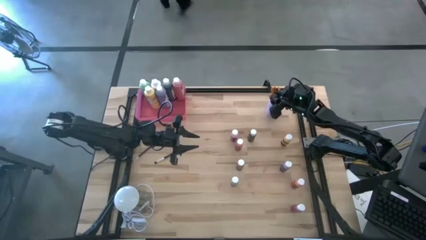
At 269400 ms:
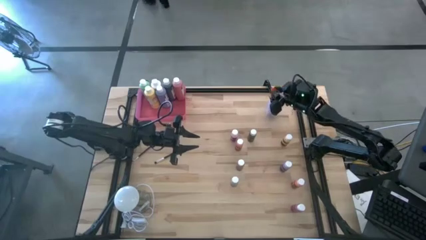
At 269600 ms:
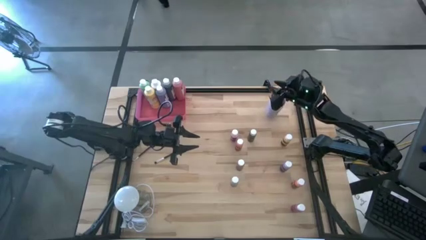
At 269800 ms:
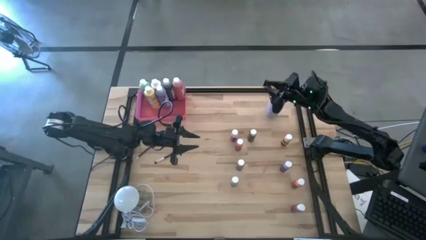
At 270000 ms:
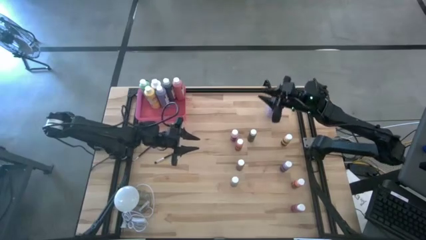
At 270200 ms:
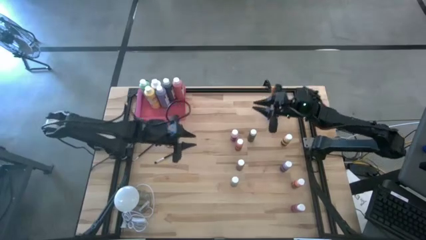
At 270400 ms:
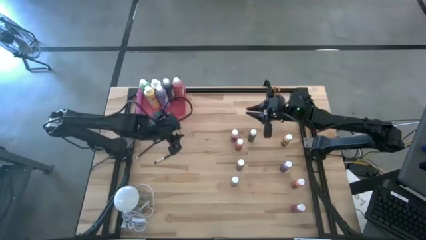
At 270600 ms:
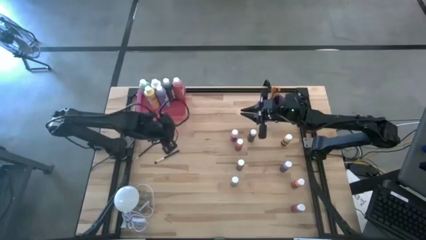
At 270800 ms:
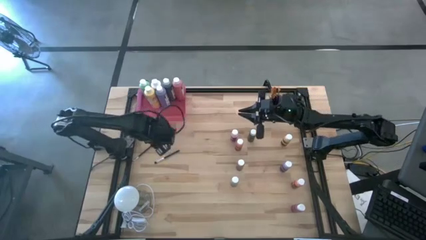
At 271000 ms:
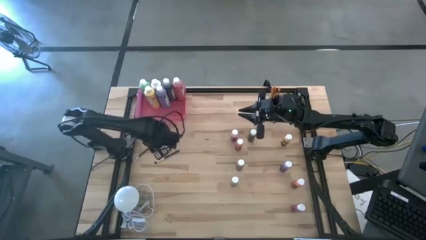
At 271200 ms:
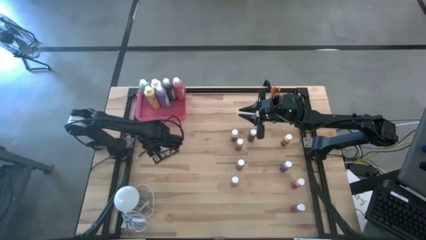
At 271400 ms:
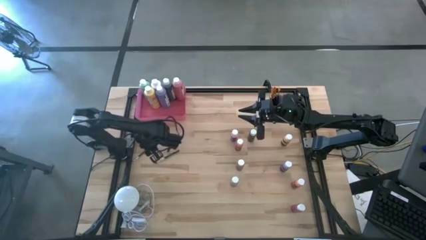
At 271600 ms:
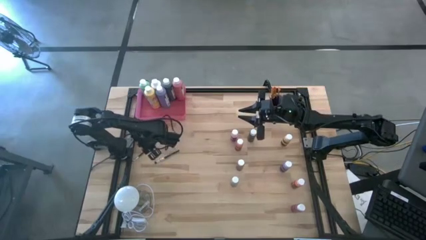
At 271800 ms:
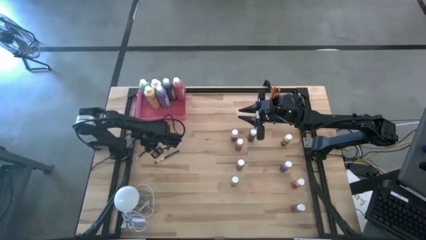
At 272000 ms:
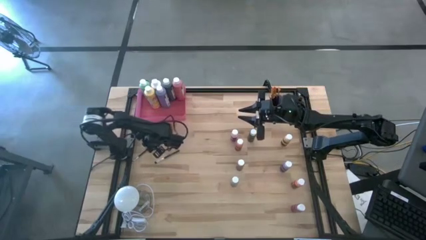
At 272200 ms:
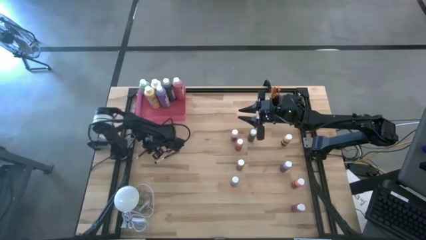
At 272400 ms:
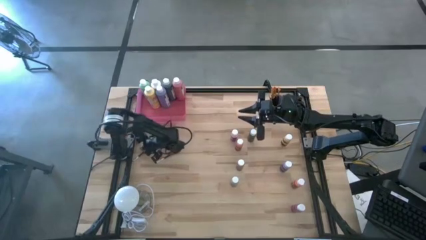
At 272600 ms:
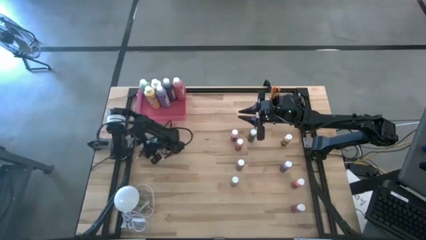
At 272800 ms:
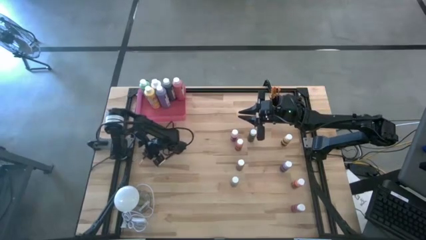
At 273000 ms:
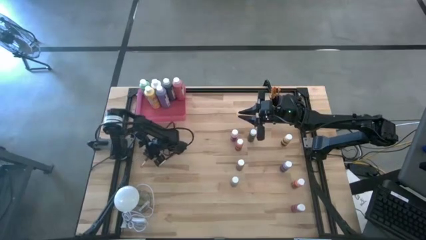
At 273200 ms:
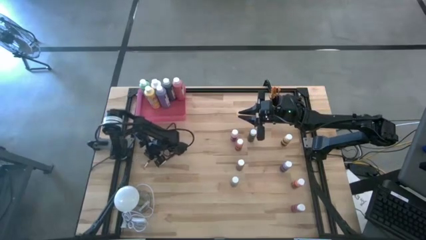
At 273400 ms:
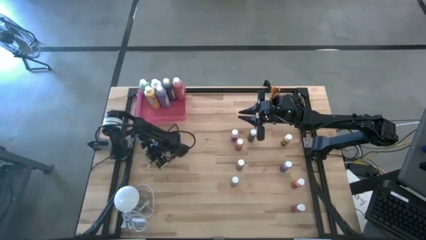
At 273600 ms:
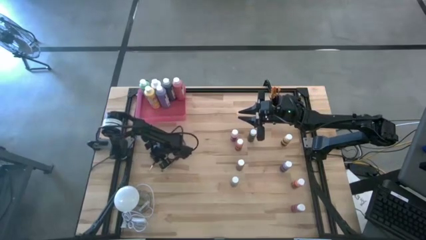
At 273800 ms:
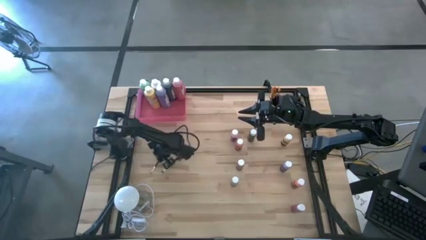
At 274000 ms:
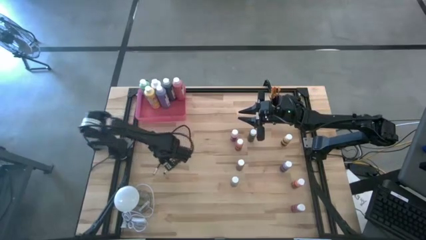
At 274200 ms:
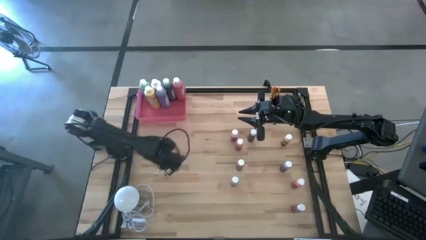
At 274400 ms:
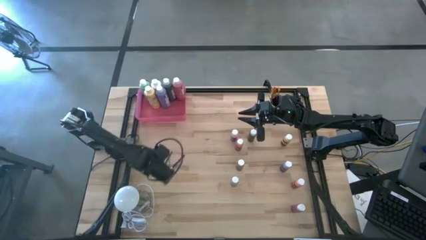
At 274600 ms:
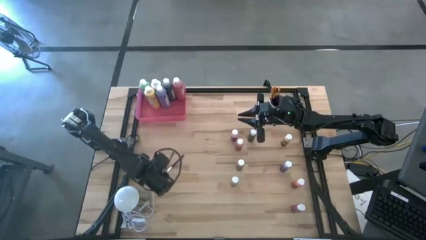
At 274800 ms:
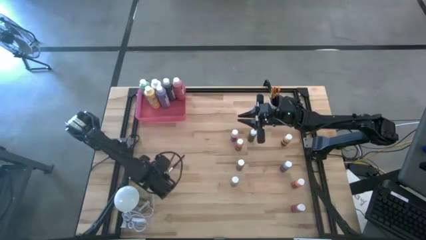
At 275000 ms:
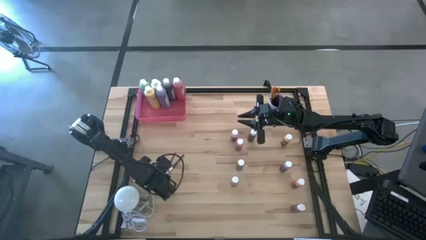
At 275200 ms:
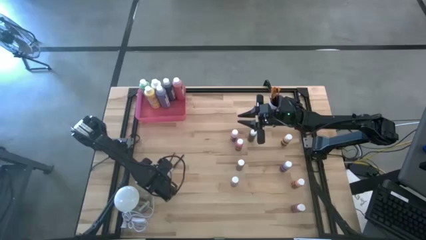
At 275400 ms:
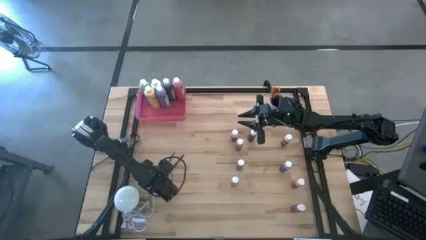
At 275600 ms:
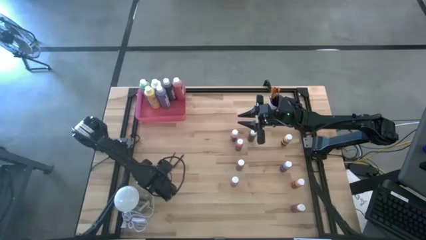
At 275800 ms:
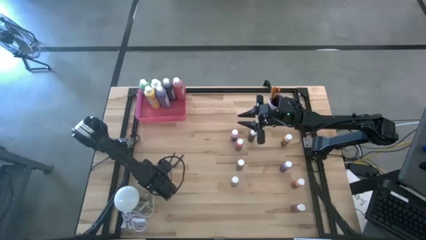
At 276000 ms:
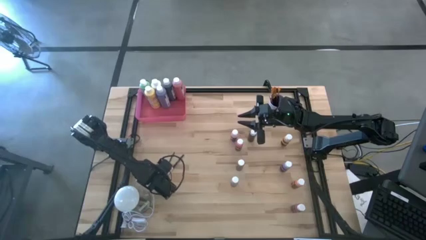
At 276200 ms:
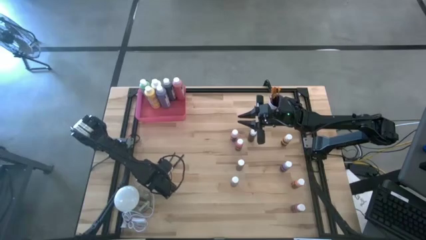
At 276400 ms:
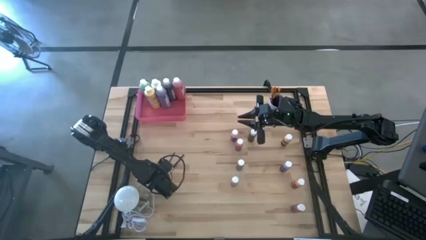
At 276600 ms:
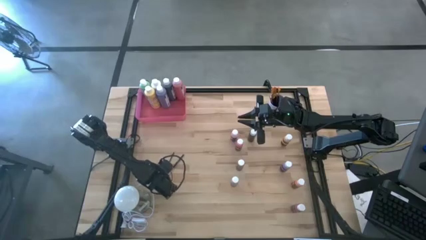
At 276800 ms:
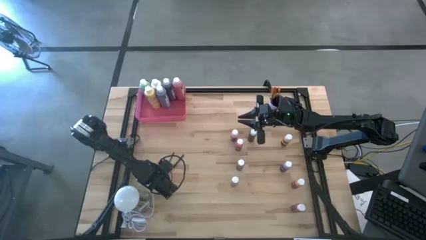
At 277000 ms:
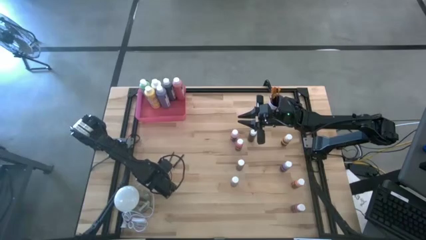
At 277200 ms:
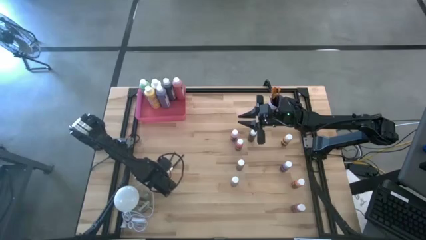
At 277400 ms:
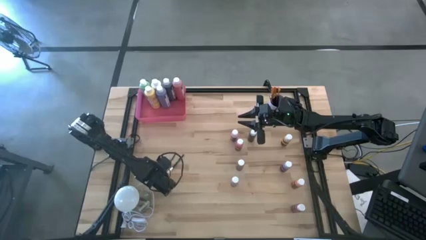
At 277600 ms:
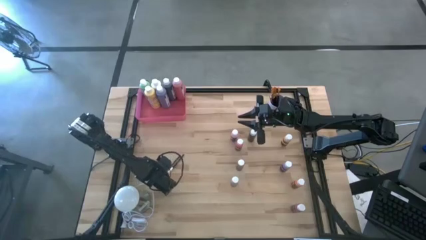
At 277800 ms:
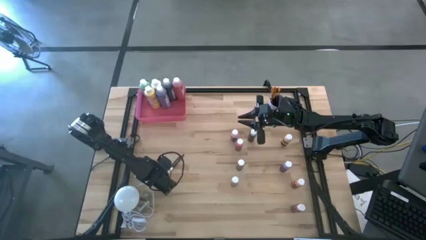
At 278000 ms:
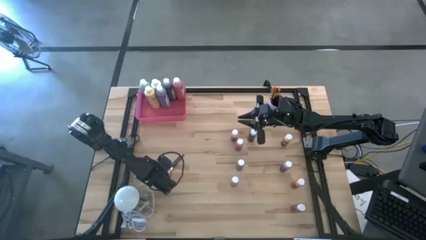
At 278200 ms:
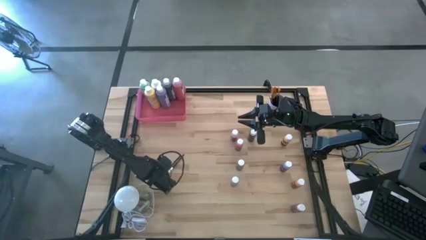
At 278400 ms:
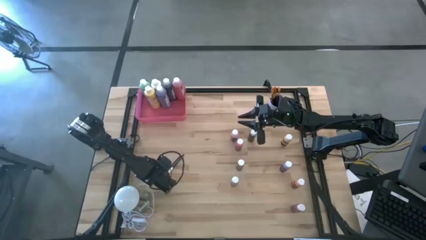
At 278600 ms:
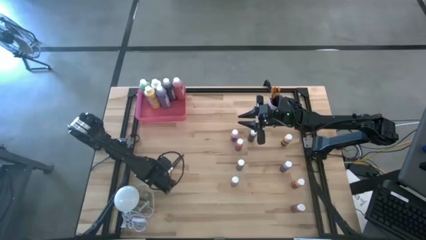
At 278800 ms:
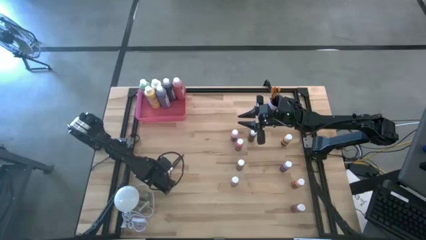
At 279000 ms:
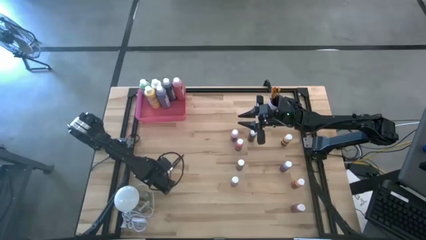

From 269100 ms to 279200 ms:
Task: Pick & Place Paint Supplies
Put the silver paint brush into the purple cup

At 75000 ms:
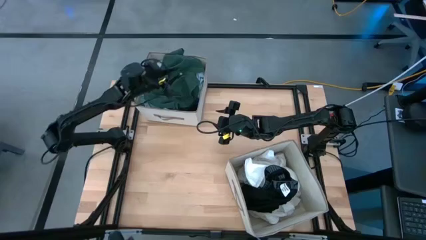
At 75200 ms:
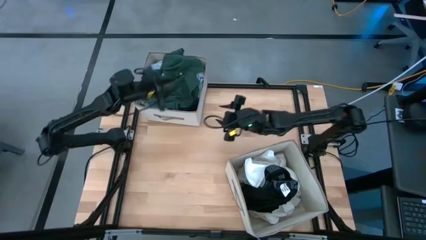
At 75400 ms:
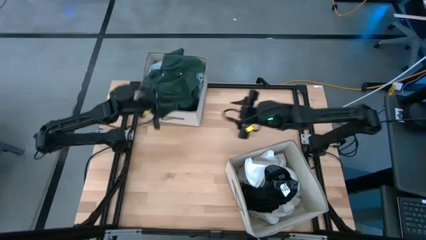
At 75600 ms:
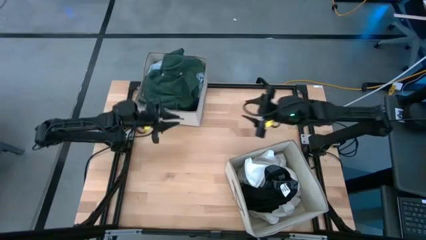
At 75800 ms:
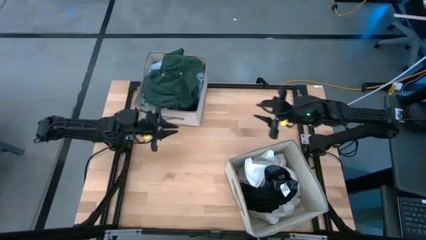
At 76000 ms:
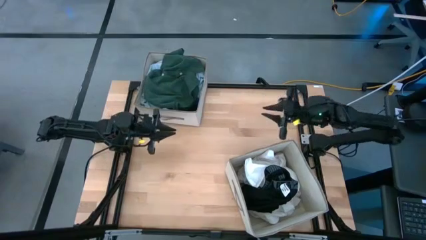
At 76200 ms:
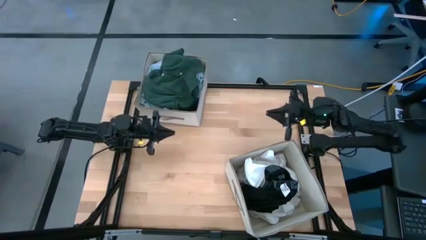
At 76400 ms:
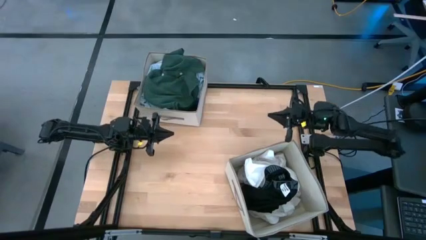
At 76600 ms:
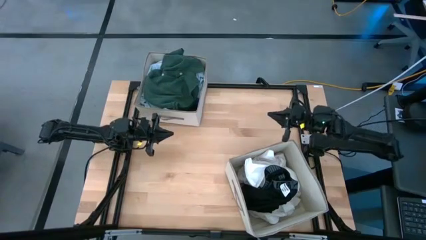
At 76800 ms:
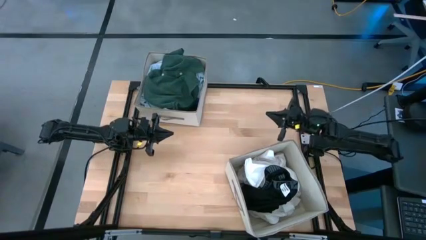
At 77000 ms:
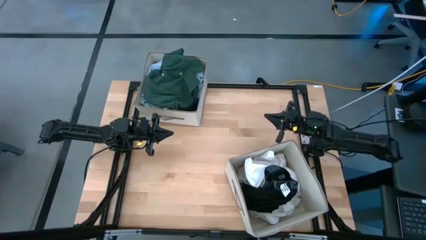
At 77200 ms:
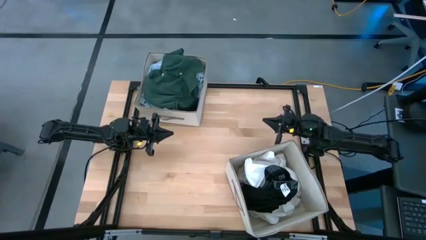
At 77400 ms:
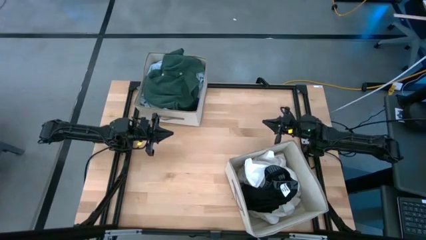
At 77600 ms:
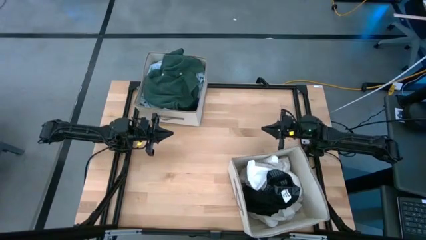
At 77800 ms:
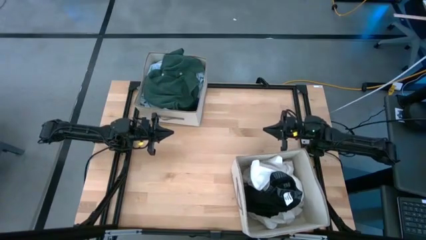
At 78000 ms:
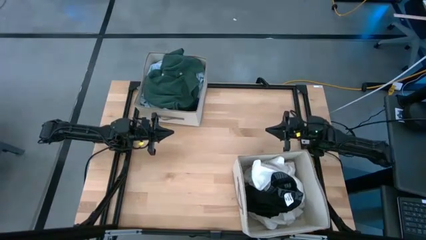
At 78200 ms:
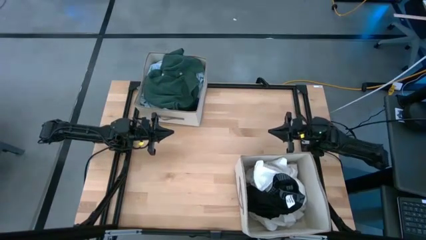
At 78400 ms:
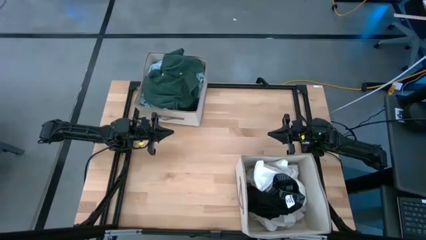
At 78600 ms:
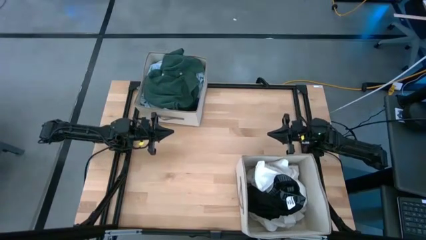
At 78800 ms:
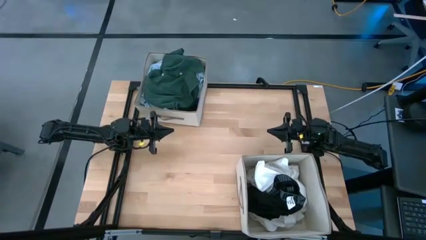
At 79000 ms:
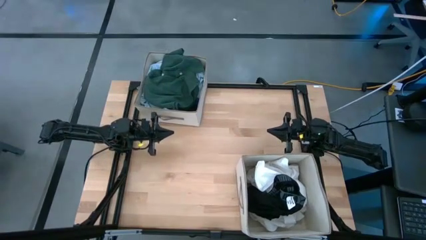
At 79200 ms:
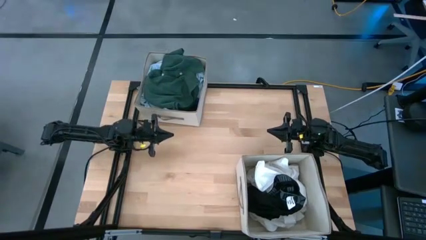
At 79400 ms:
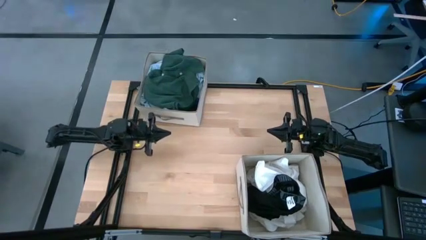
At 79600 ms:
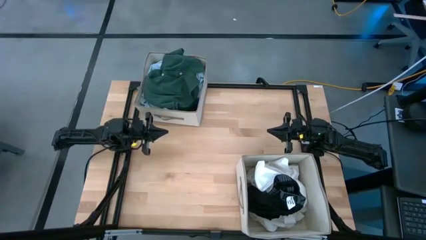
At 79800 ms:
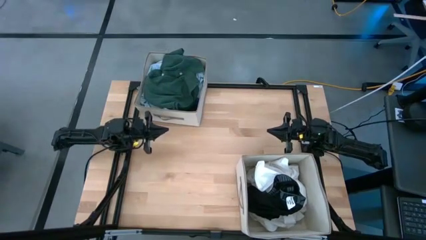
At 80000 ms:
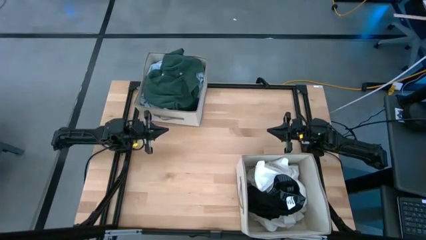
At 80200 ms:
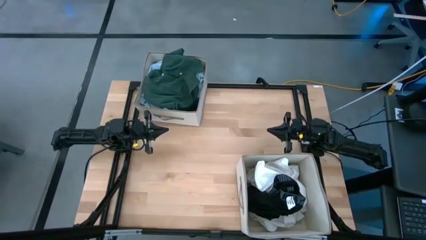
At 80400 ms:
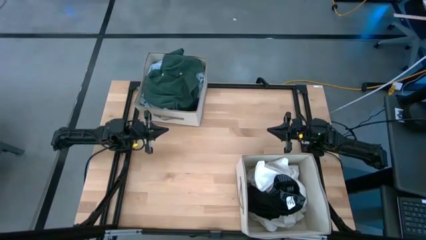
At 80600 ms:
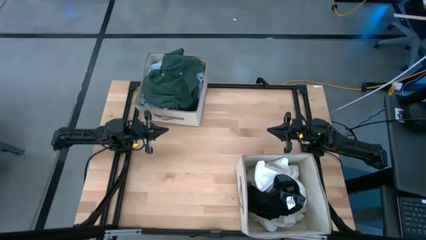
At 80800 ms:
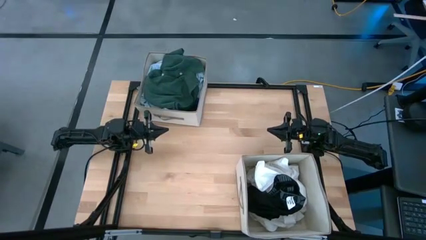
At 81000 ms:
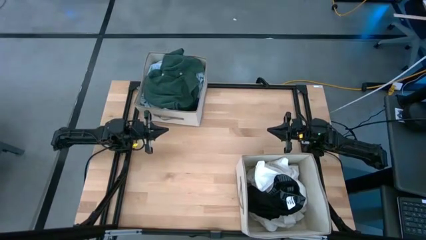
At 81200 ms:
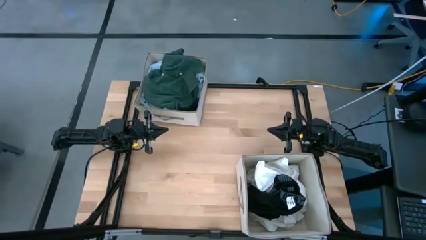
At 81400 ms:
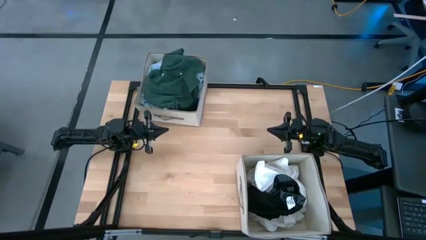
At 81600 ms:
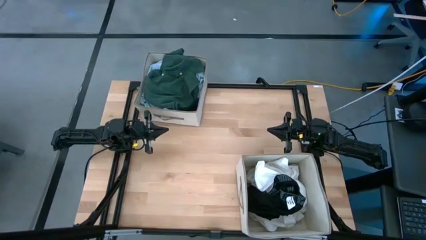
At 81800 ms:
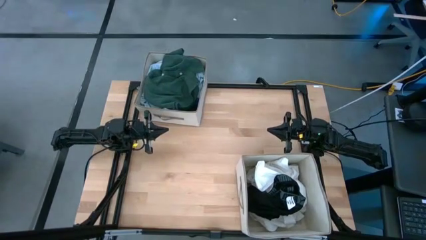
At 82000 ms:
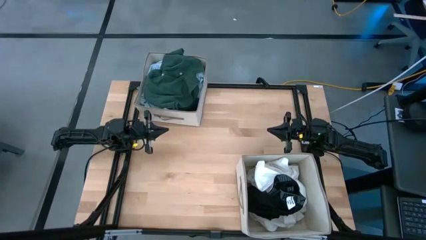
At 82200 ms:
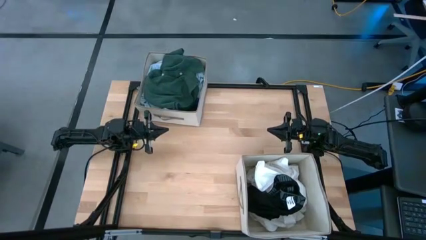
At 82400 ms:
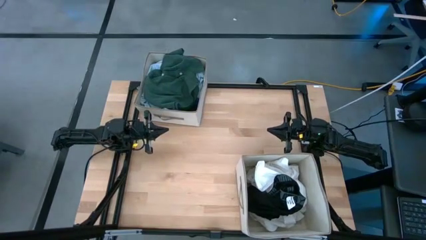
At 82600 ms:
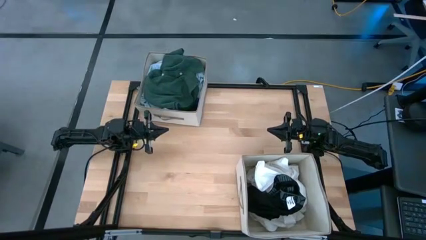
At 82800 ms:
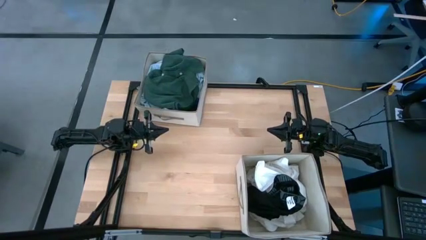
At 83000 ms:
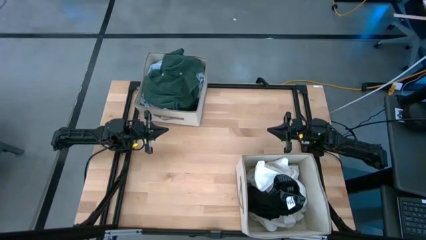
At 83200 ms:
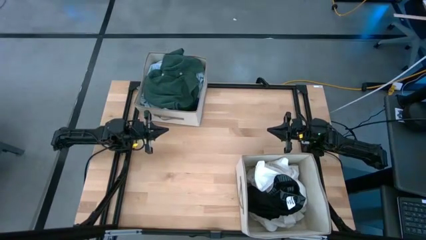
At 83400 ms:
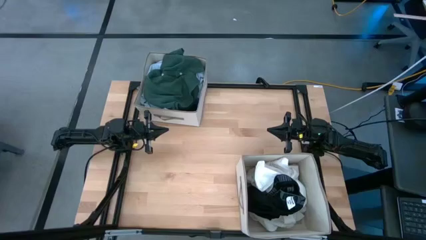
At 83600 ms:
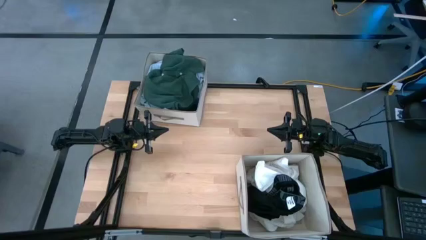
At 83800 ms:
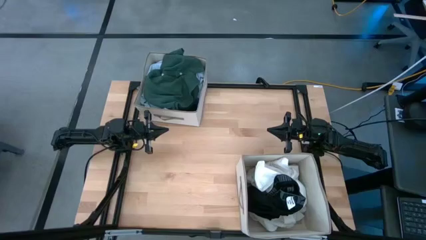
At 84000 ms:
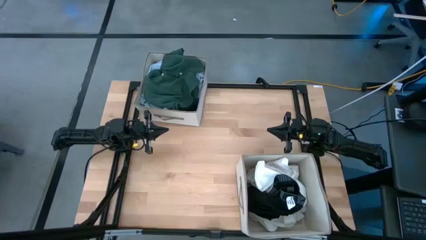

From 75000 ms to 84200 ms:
Task: Sort clothes
Return to Home Position
